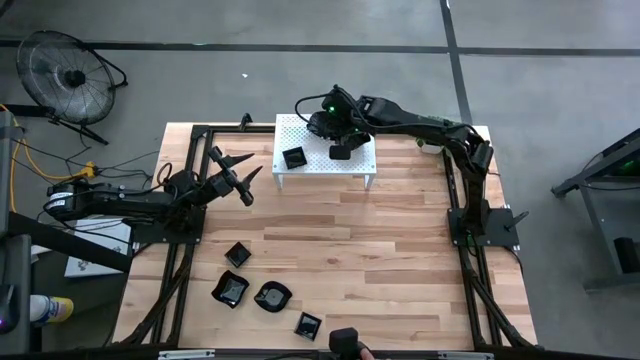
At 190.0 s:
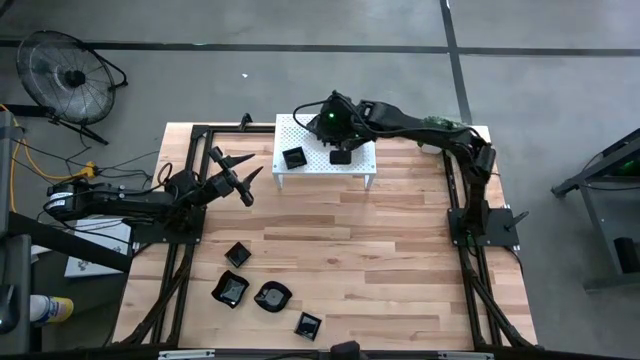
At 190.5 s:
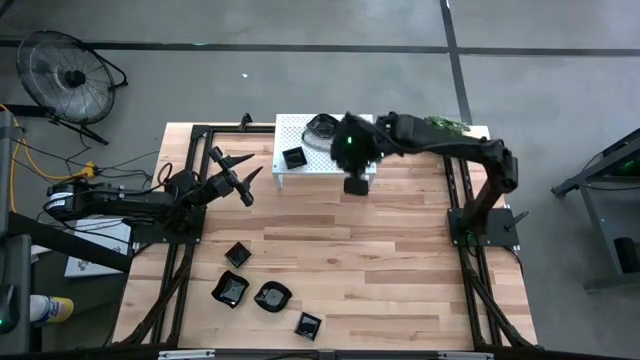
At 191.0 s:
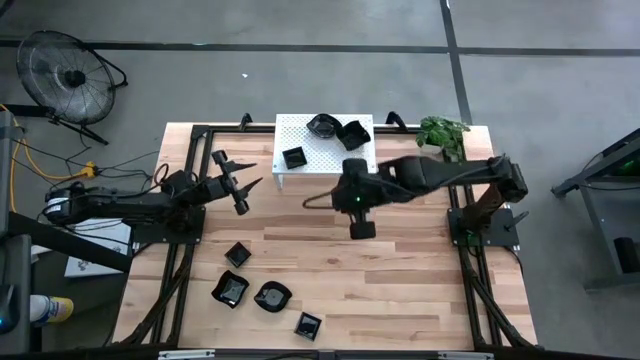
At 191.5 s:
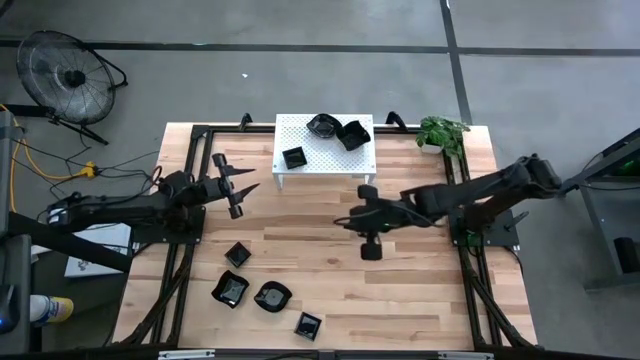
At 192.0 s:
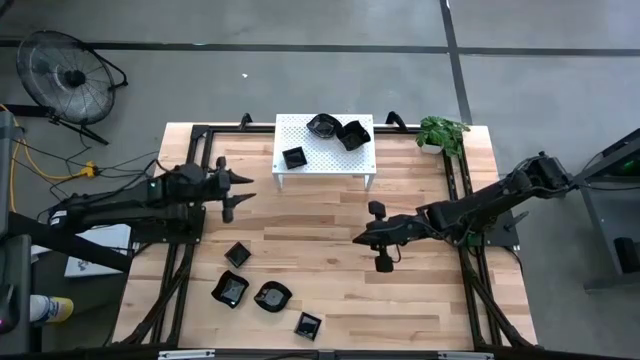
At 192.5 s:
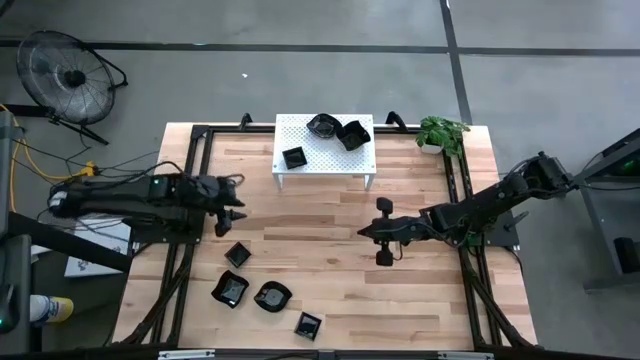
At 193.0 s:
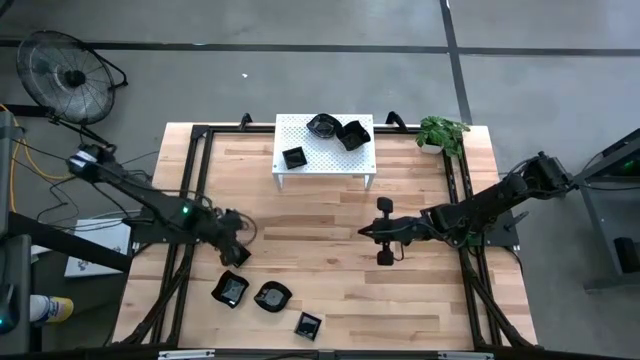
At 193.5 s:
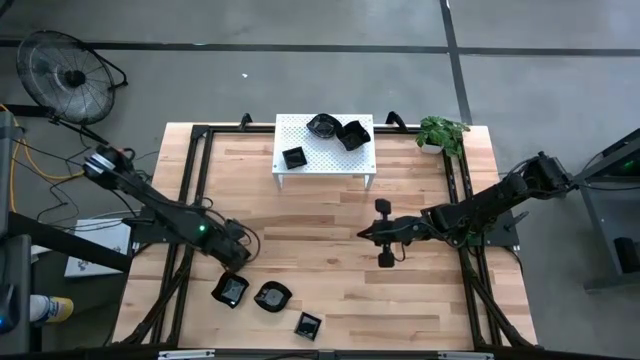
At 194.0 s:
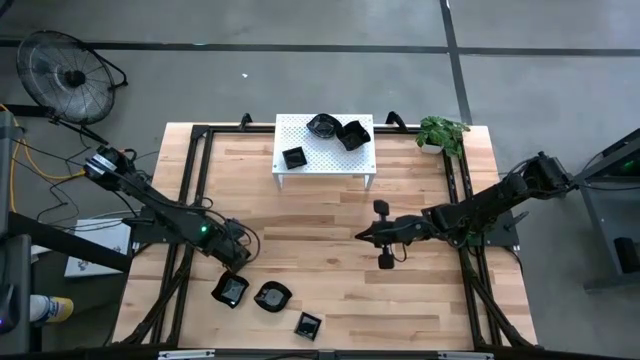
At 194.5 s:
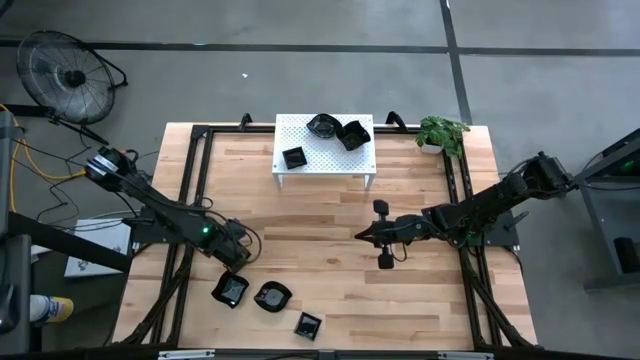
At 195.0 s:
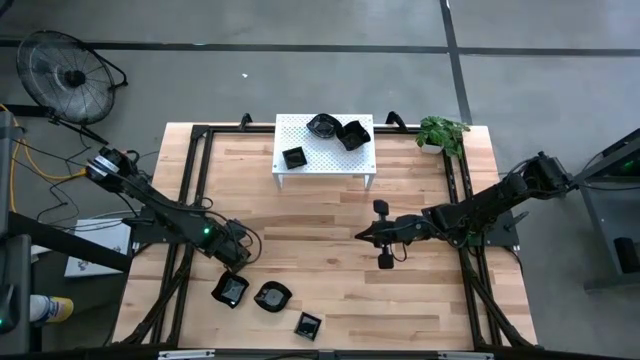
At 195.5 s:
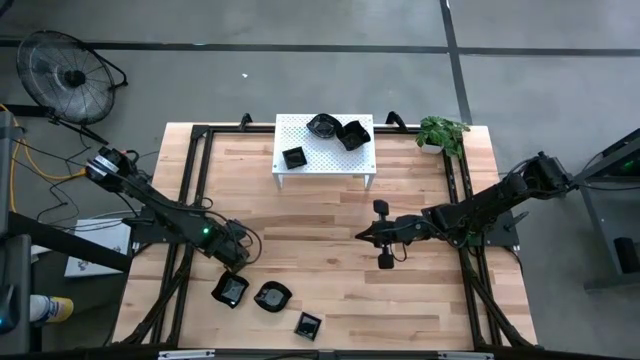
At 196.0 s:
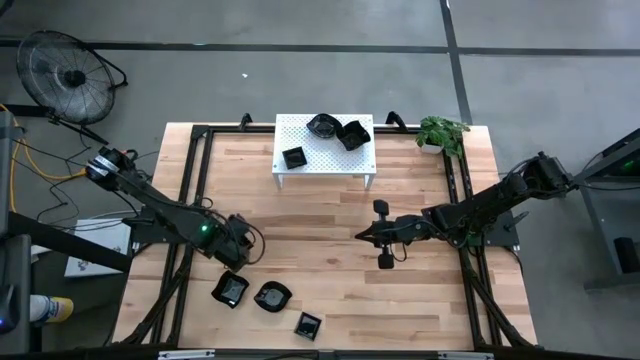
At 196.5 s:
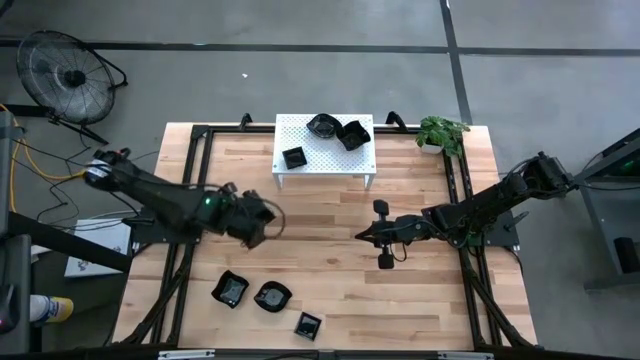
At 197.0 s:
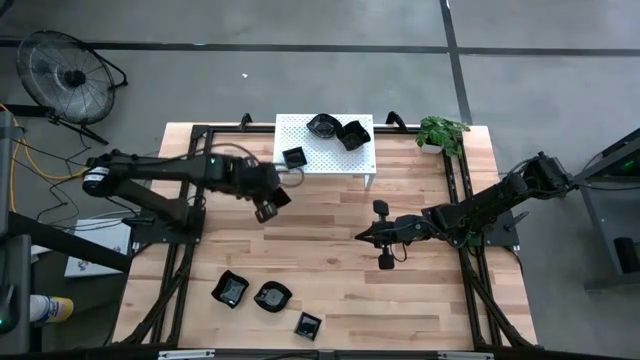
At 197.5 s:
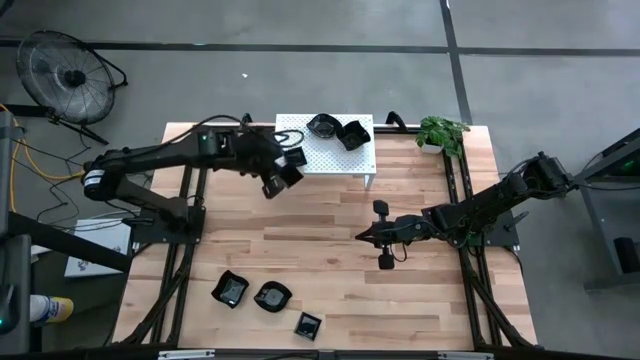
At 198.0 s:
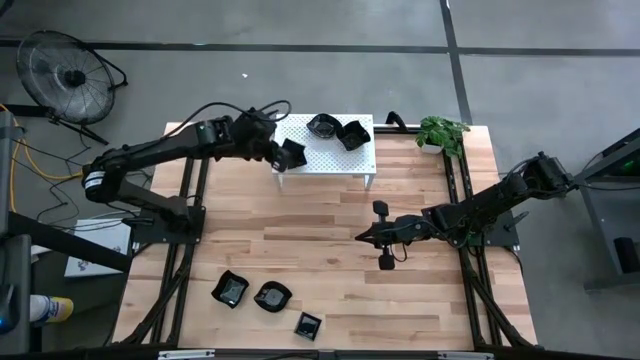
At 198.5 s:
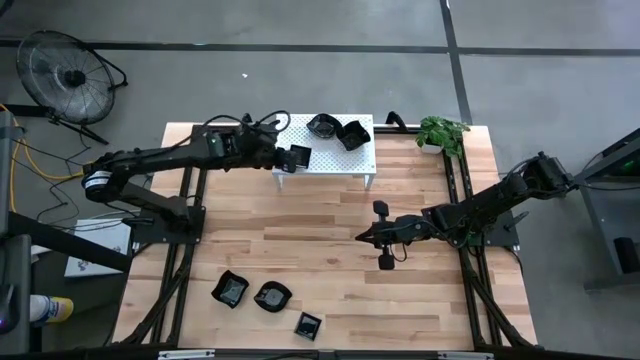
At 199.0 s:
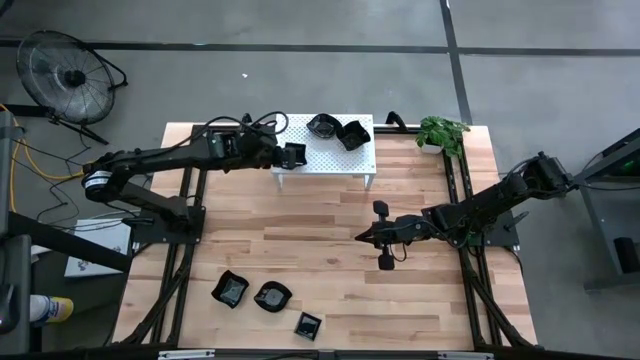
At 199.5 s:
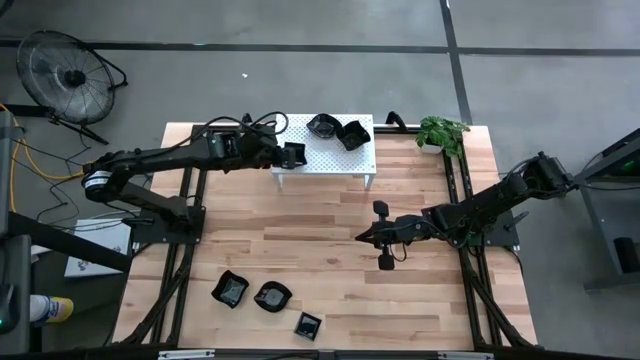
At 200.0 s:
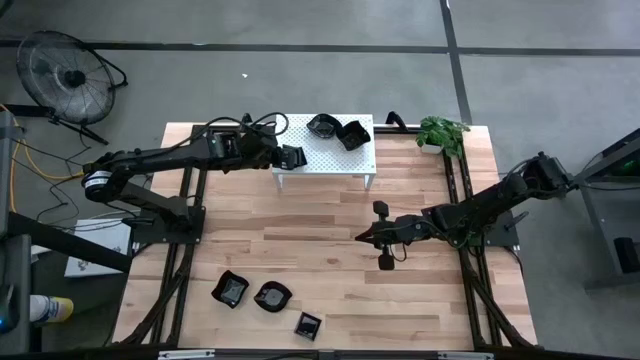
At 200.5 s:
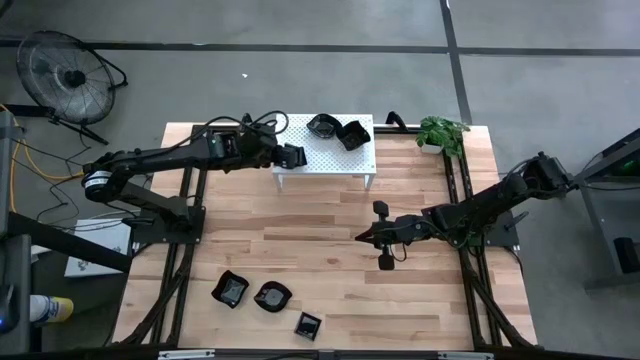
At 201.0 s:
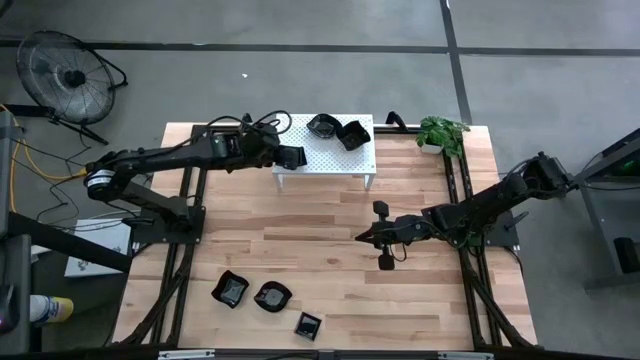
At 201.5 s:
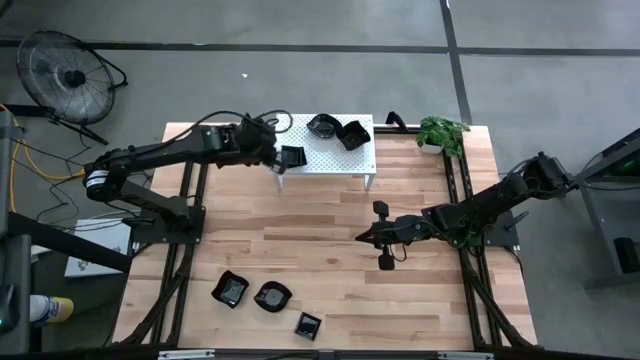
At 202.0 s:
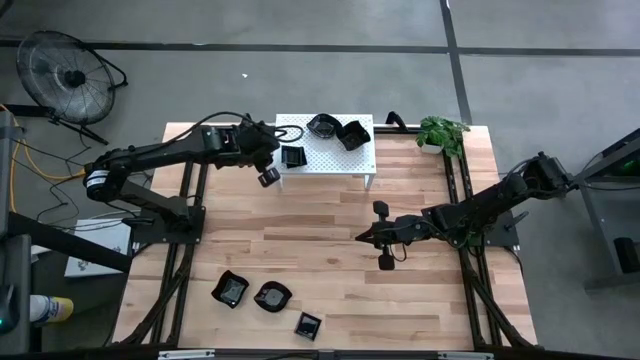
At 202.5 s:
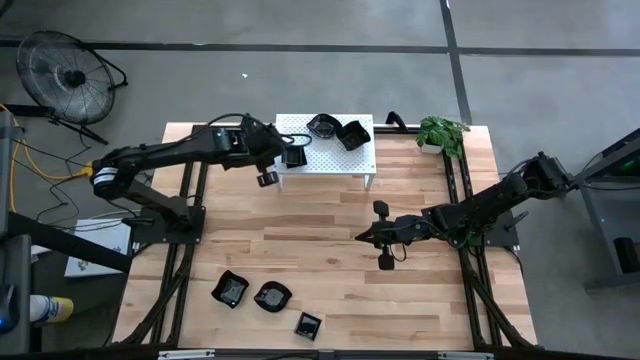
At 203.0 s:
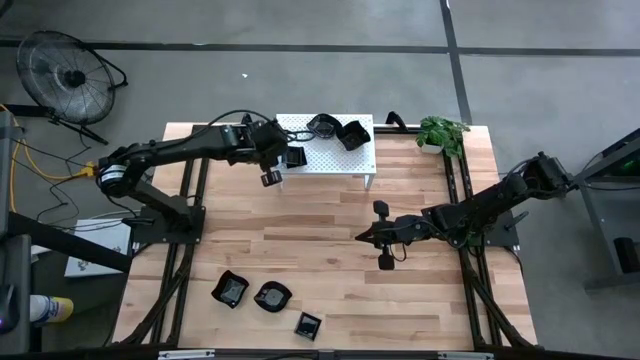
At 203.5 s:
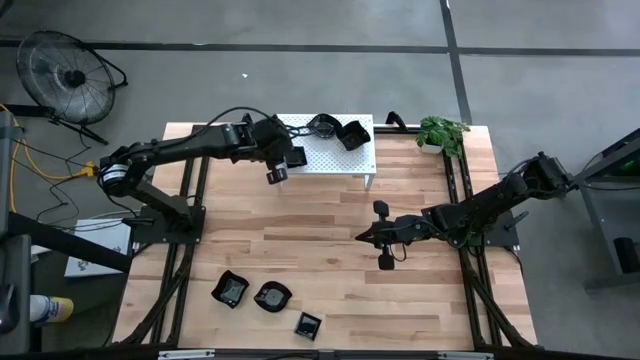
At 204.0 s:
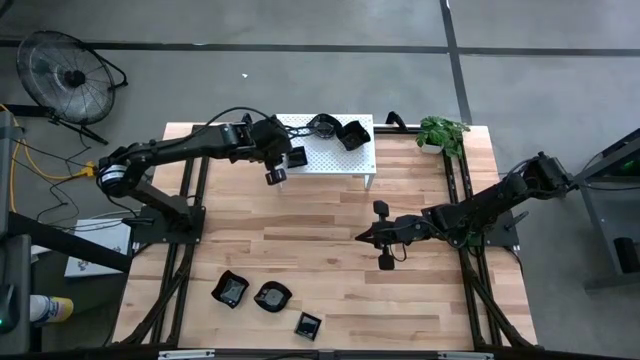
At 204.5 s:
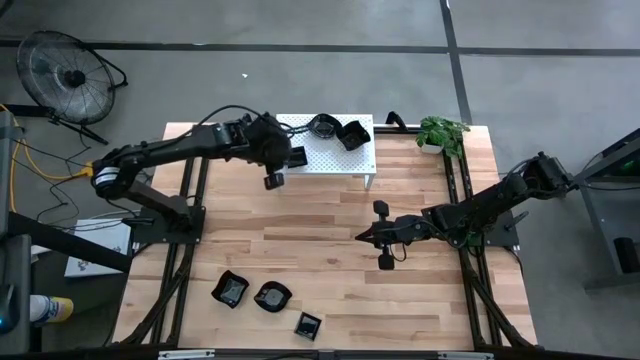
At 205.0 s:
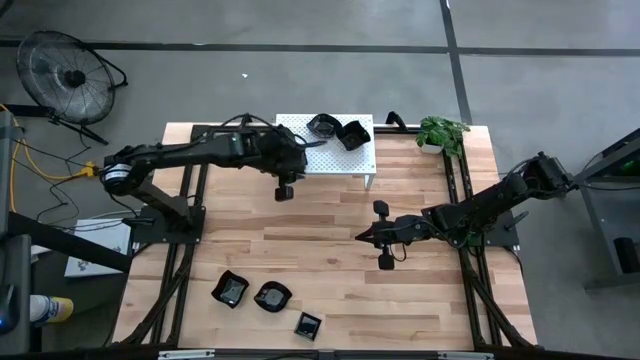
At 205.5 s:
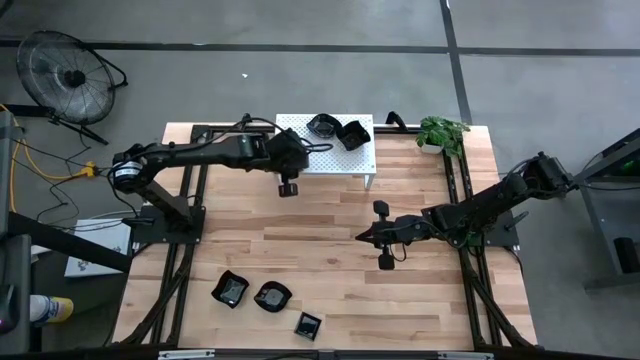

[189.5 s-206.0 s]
Task: Pick & Place Mini shaped plates
Stack the black square plate on top of the black square plate on the shelf

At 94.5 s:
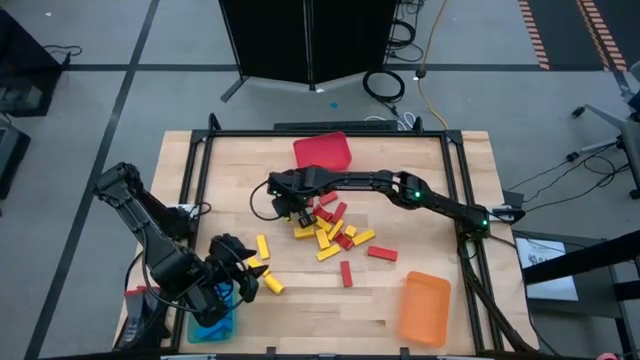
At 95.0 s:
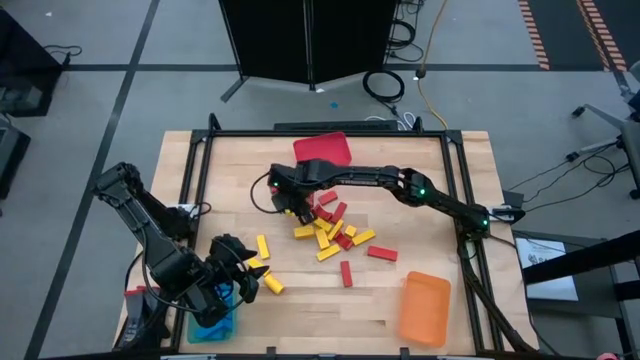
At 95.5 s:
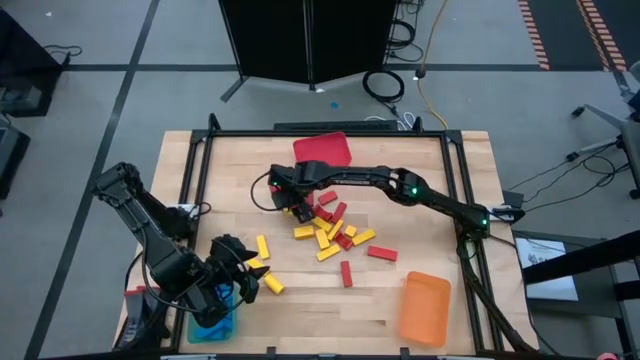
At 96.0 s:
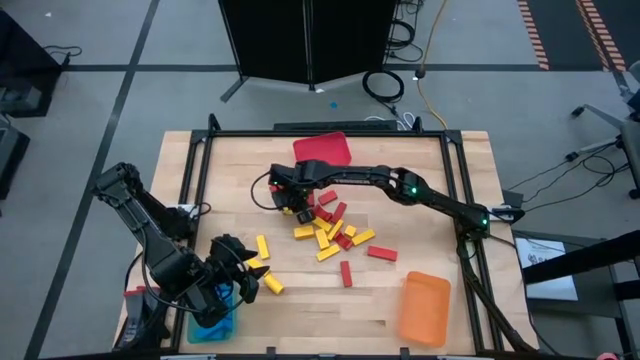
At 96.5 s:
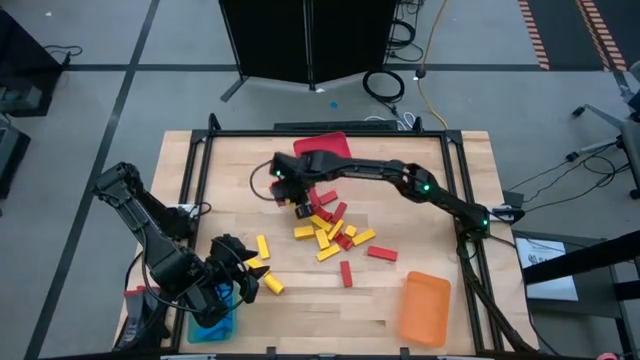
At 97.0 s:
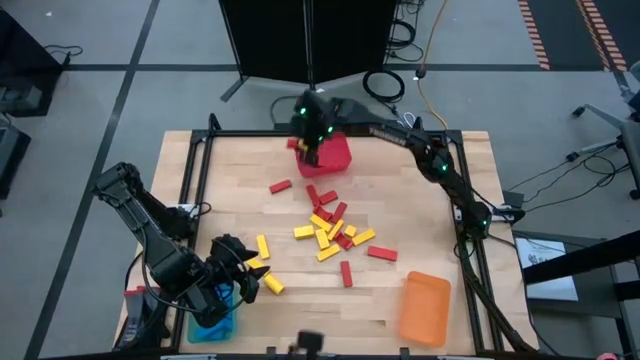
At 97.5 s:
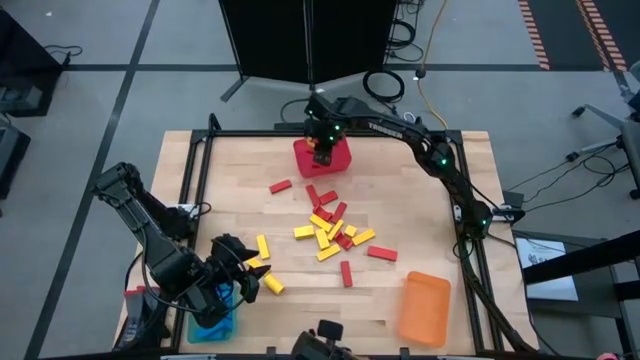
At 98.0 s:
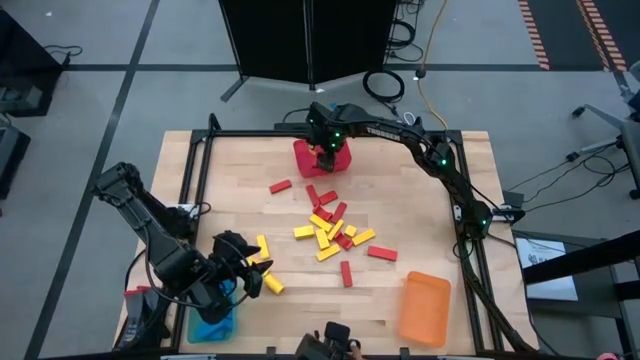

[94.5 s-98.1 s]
Task: Sort blocks
Put the red block into the red bin
